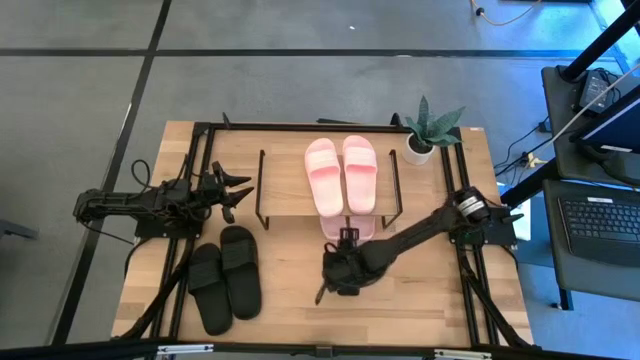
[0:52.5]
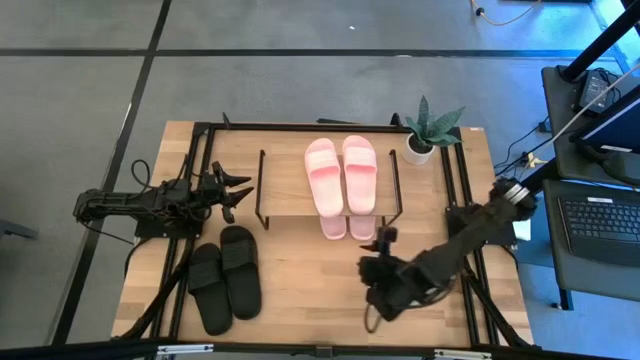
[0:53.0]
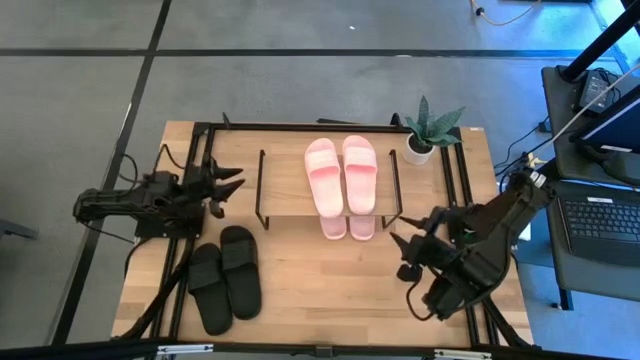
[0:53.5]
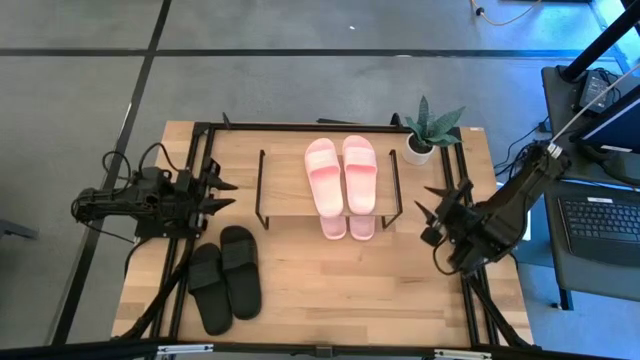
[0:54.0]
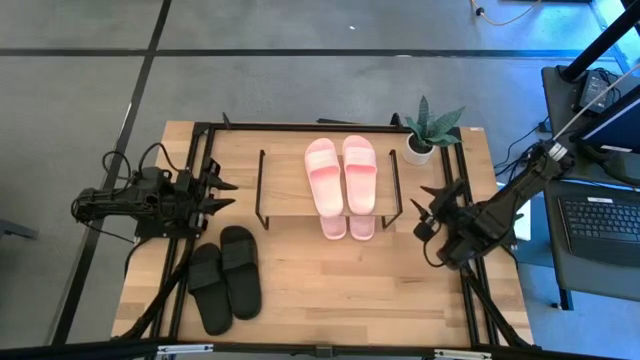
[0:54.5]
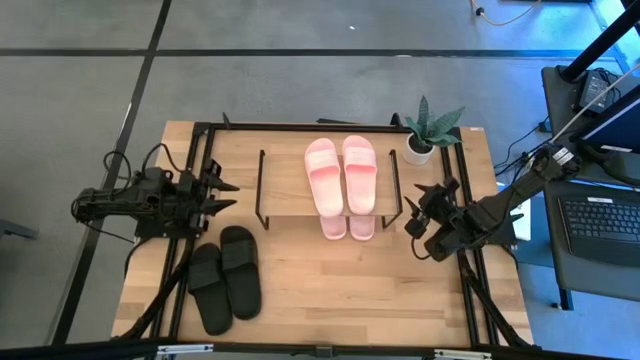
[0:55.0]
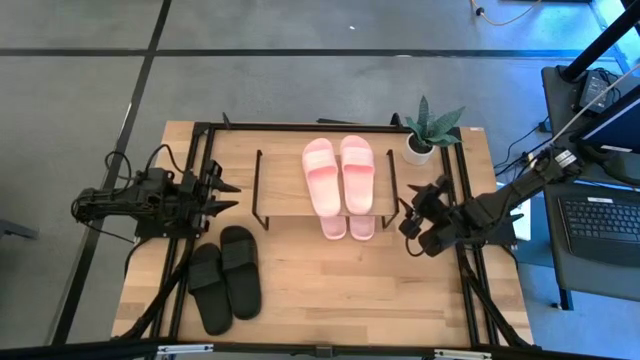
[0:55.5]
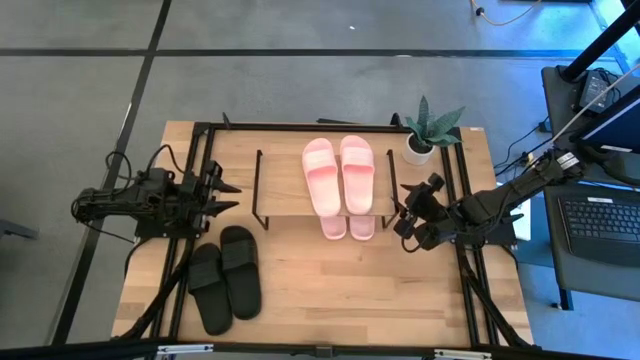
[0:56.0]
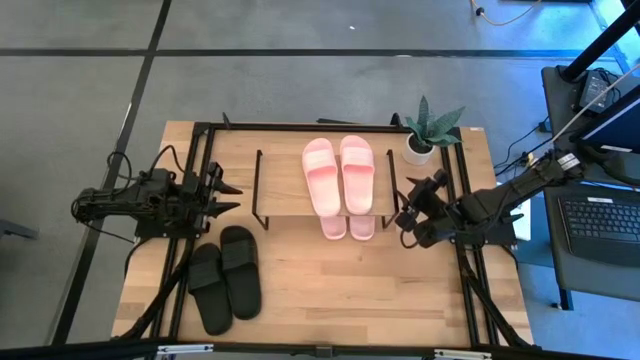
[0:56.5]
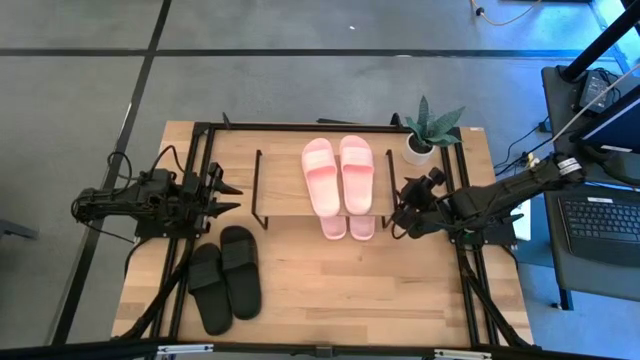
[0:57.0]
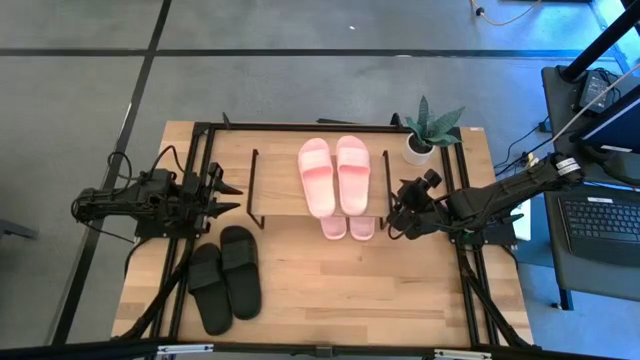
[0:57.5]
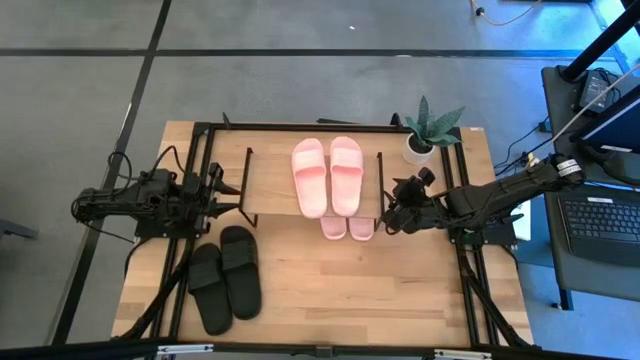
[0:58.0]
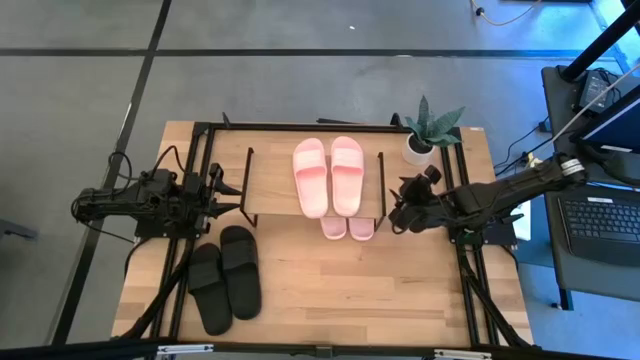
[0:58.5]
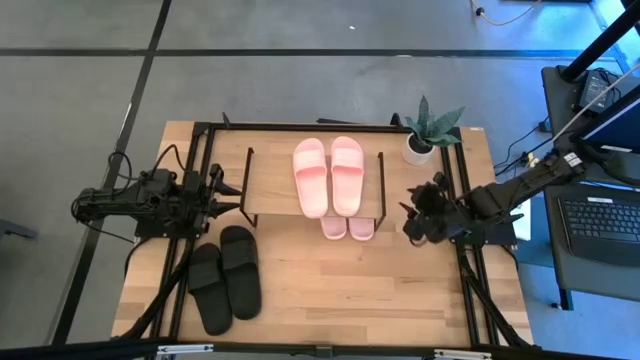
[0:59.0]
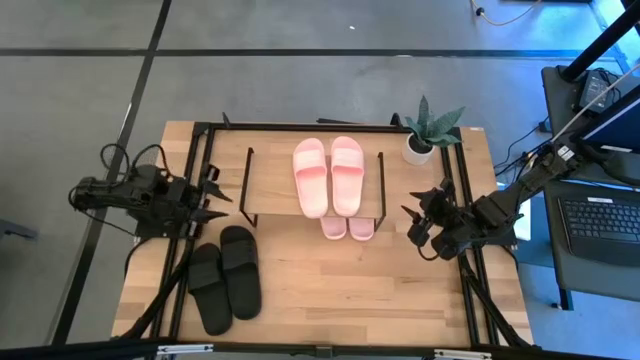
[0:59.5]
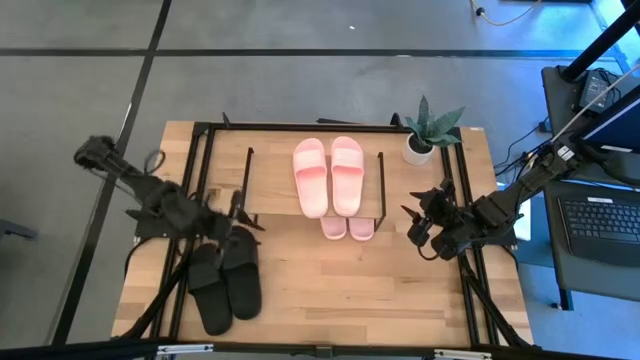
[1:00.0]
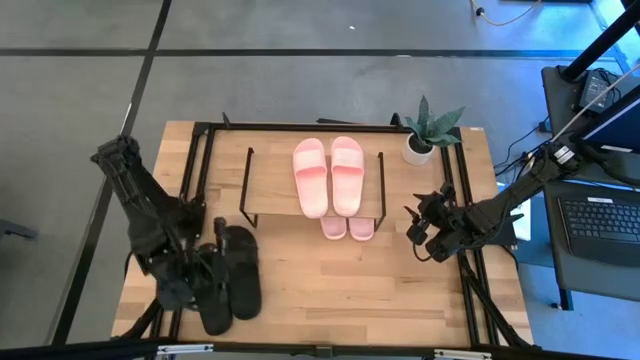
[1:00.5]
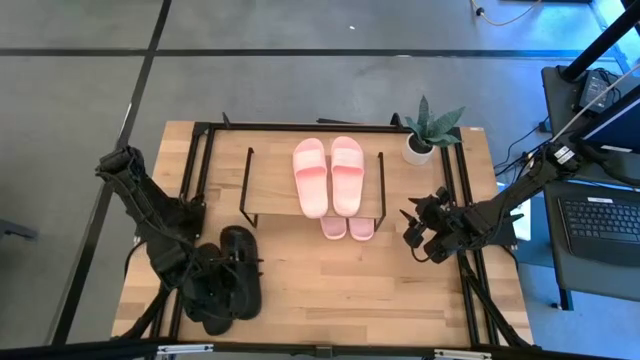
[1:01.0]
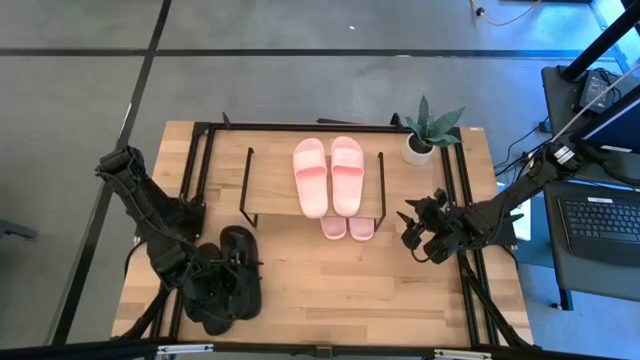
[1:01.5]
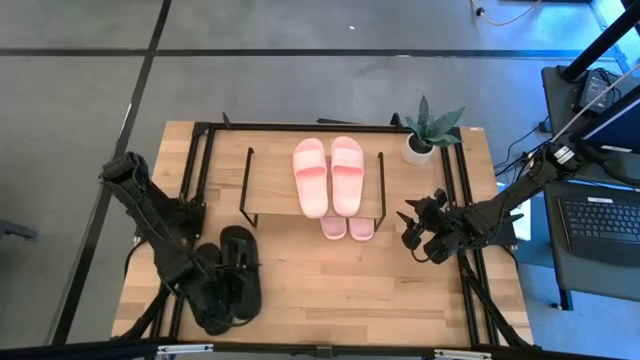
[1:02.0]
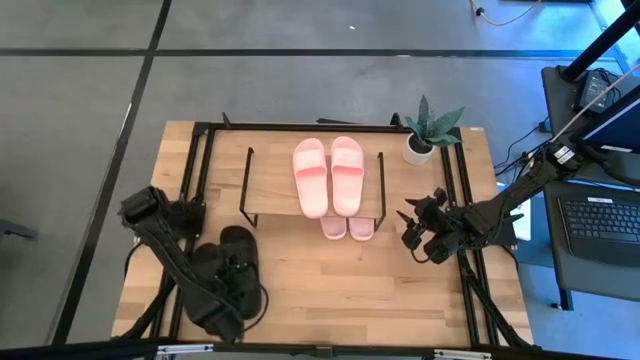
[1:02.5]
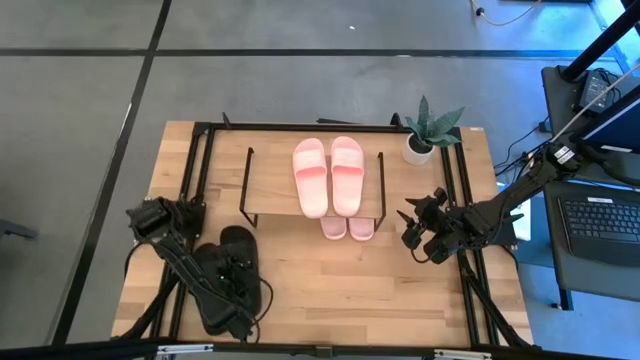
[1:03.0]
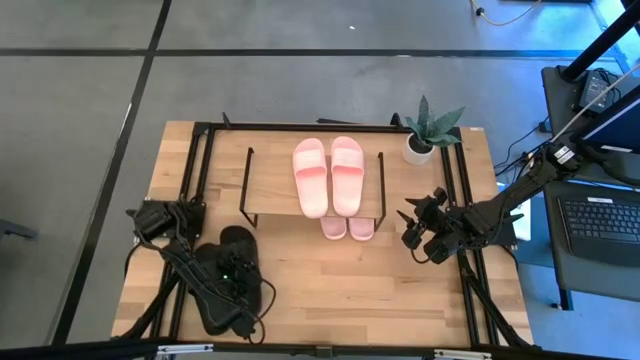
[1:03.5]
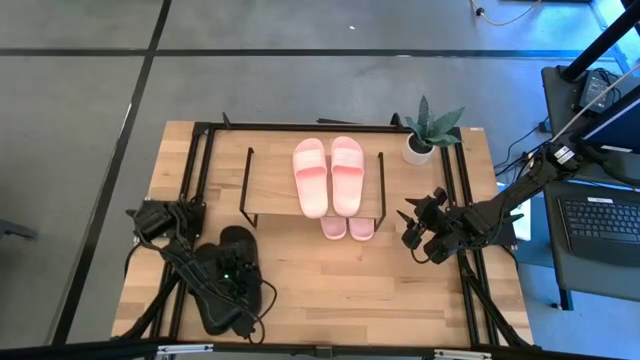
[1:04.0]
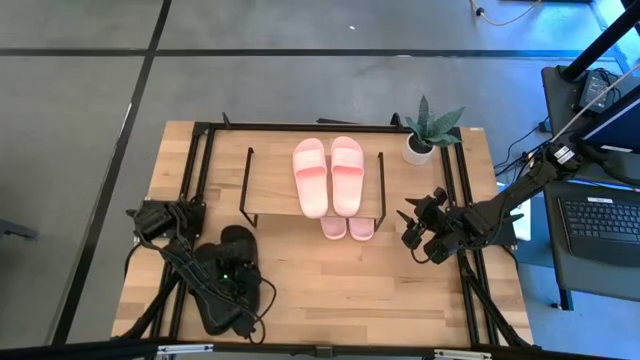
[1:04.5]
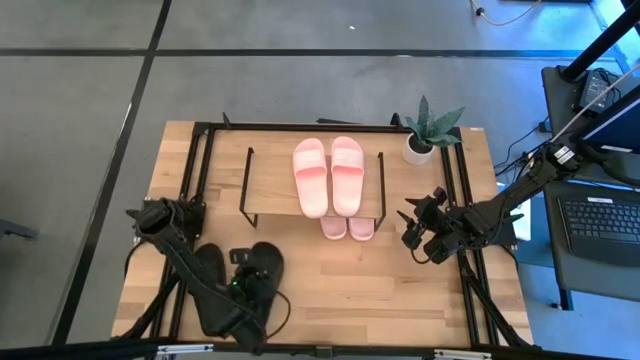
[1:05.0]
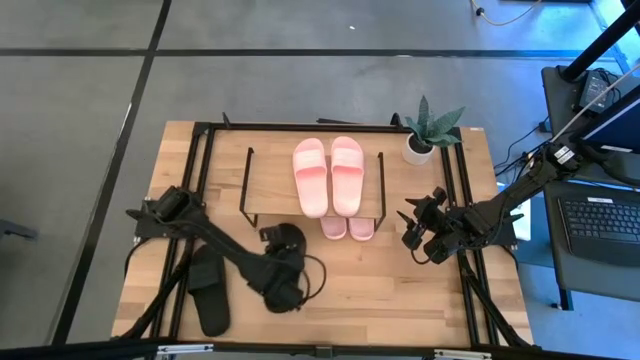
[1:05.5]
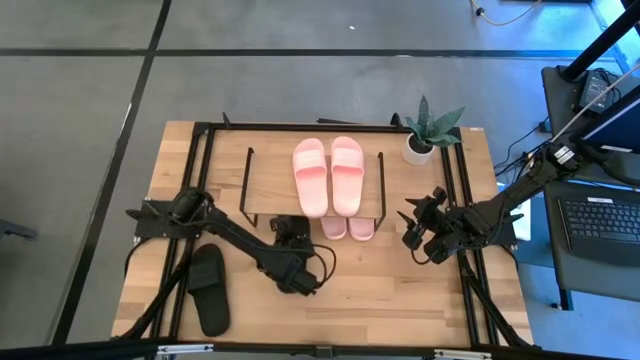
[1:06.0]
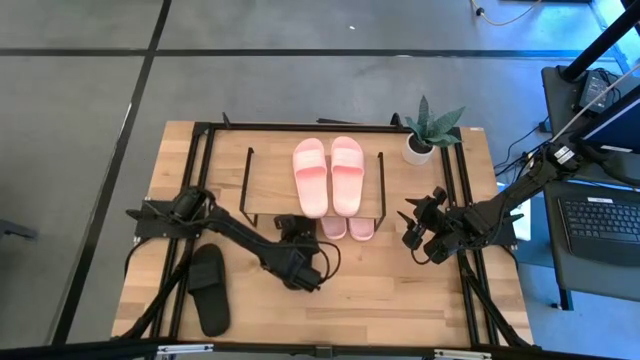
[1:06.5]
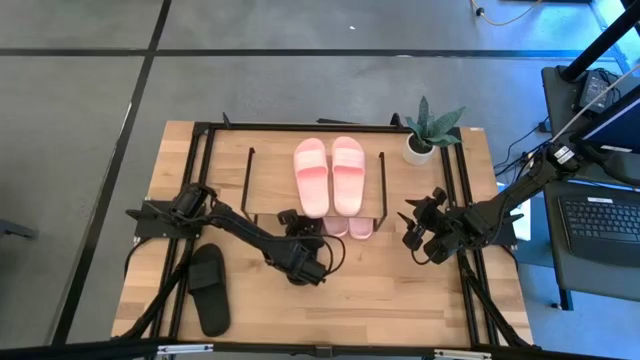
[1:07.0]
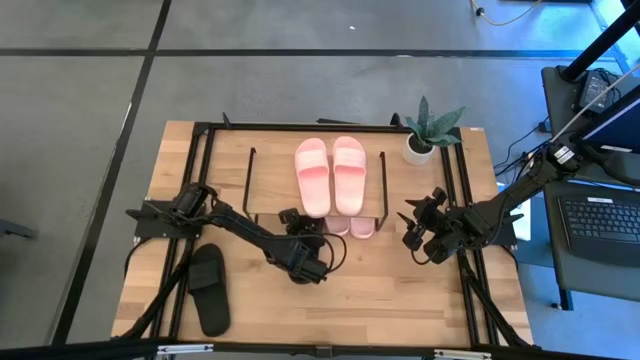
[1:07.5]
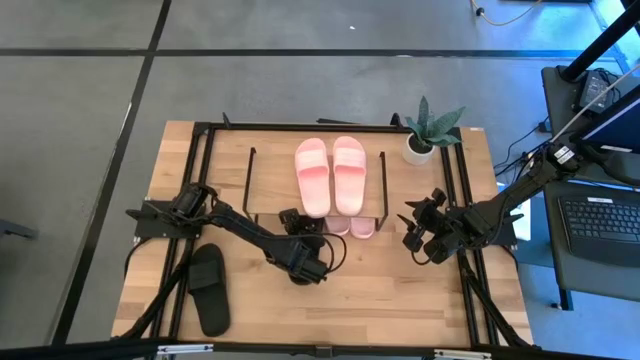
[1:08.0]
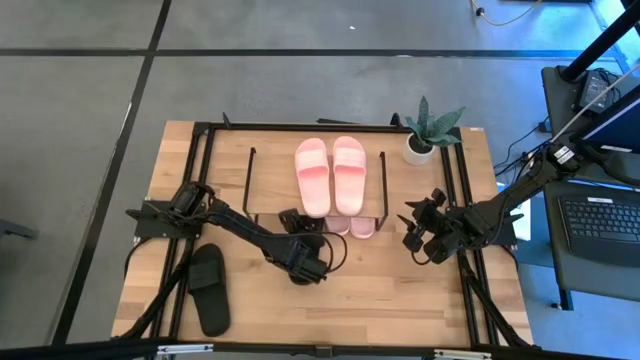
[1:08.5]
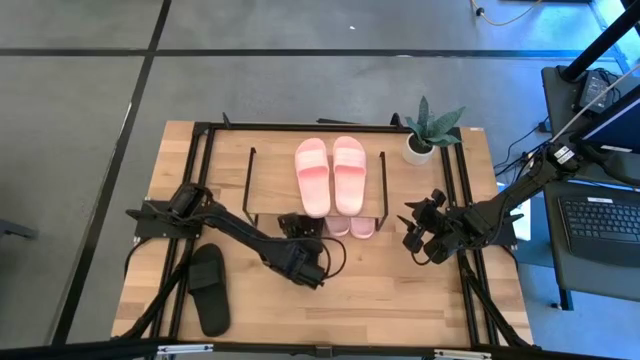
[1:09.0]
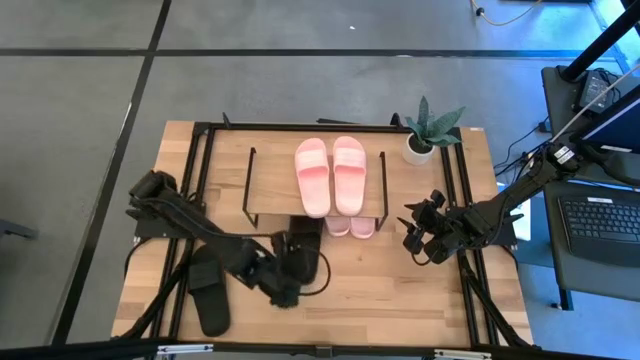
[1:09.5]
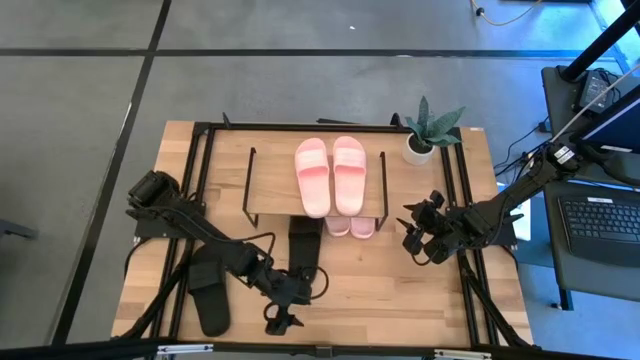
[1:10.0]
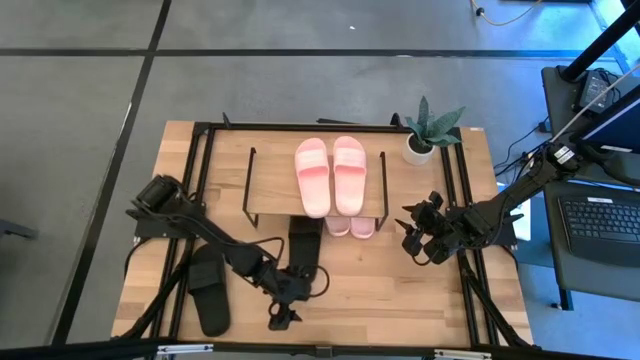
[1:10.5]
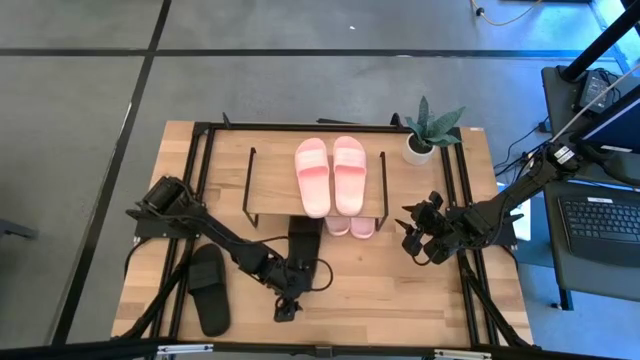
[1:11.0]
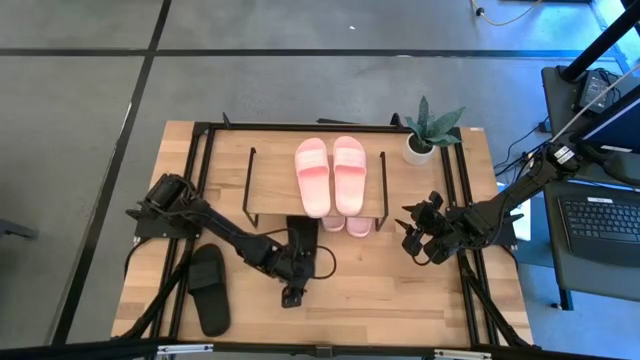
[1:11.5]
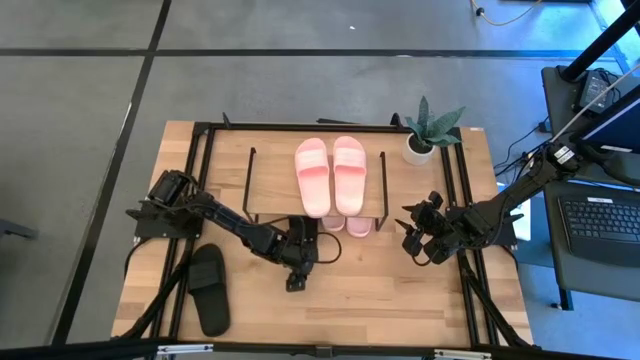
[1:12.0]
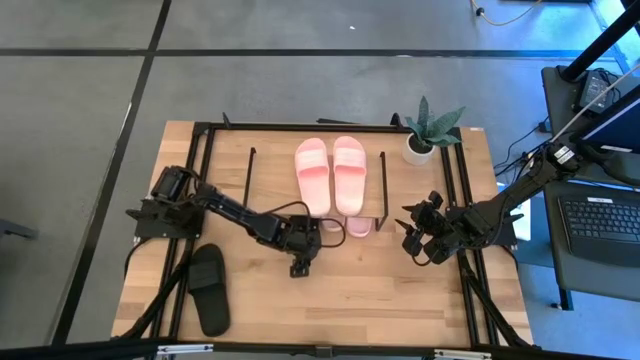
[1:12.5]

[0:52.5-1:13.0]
Task: Pick and place slides into the shelf
Move the black slipper under the shelf
